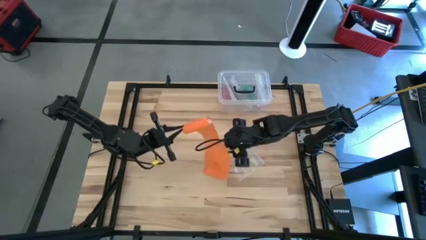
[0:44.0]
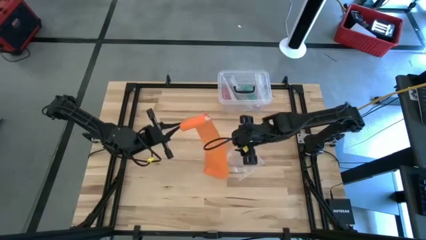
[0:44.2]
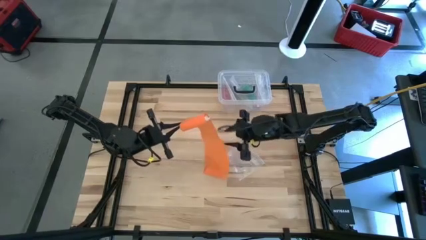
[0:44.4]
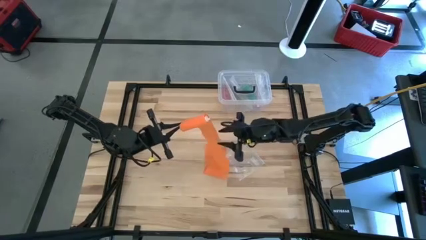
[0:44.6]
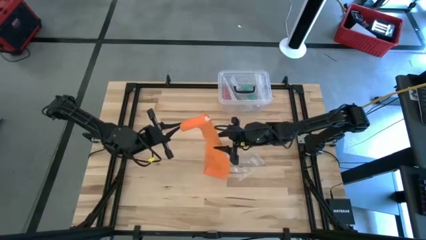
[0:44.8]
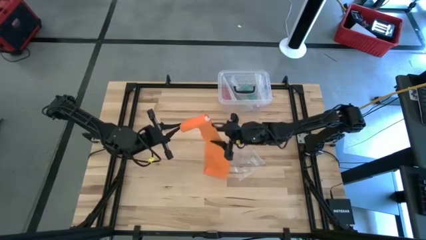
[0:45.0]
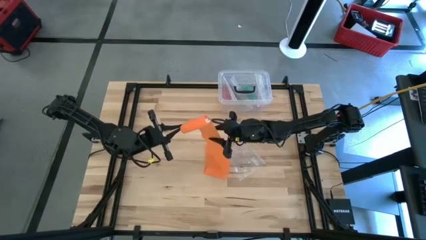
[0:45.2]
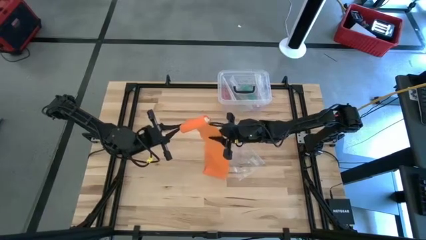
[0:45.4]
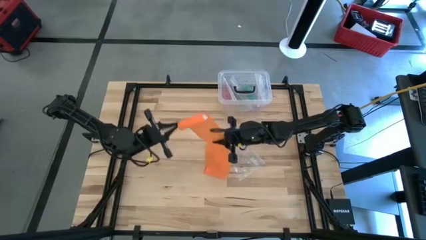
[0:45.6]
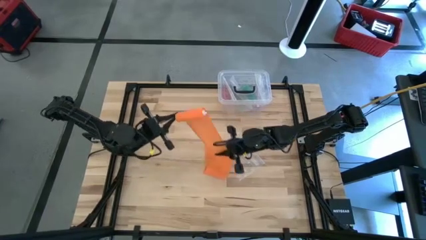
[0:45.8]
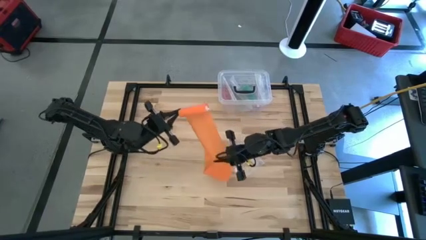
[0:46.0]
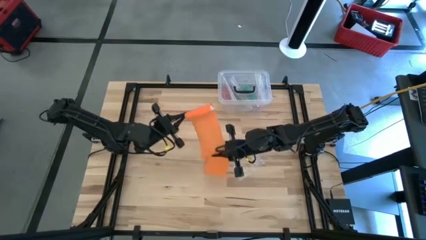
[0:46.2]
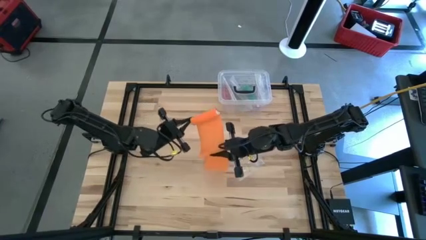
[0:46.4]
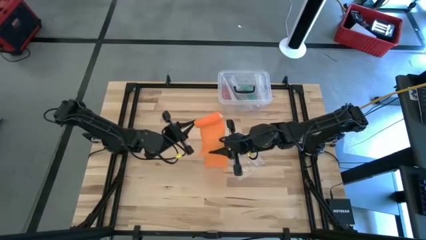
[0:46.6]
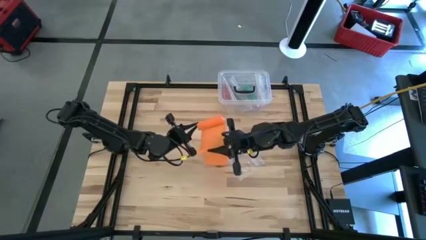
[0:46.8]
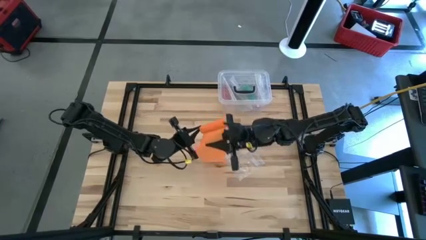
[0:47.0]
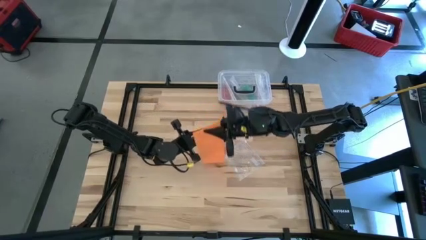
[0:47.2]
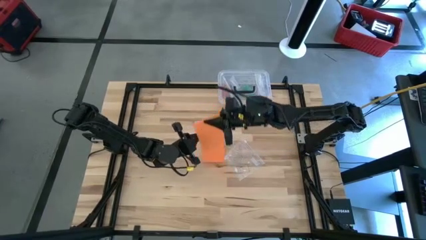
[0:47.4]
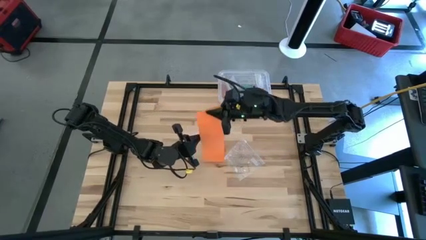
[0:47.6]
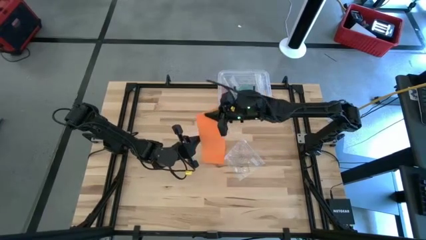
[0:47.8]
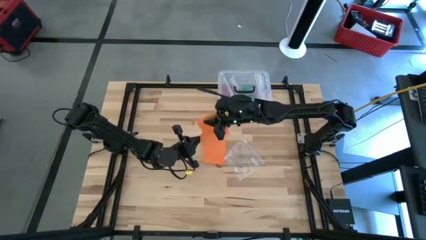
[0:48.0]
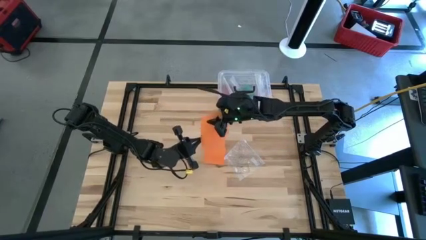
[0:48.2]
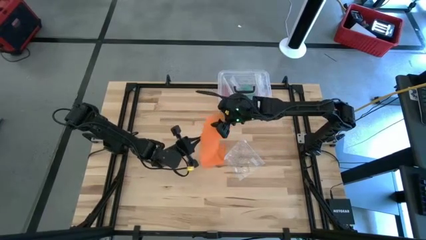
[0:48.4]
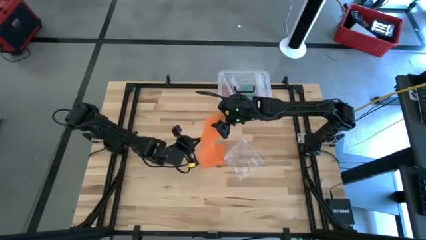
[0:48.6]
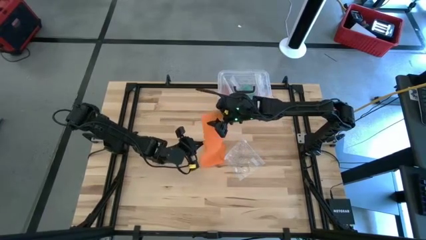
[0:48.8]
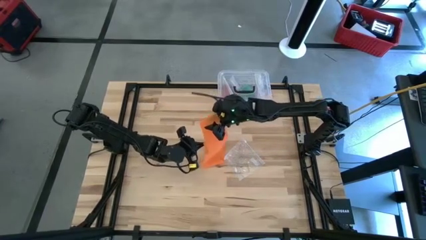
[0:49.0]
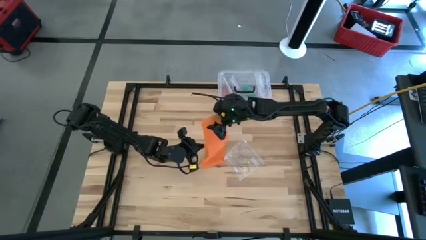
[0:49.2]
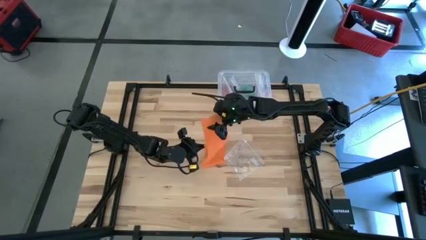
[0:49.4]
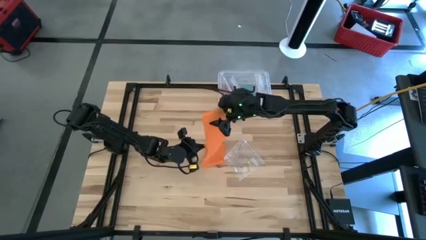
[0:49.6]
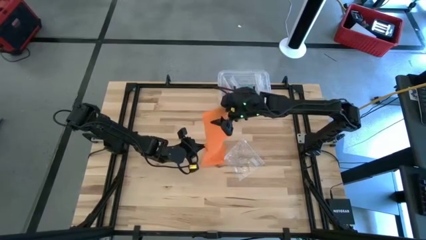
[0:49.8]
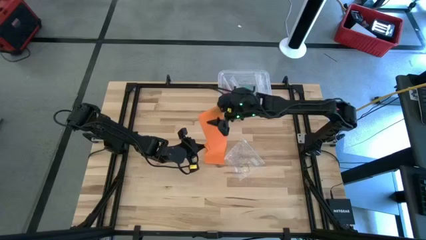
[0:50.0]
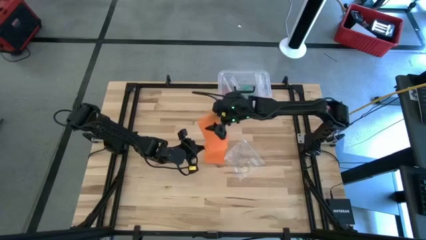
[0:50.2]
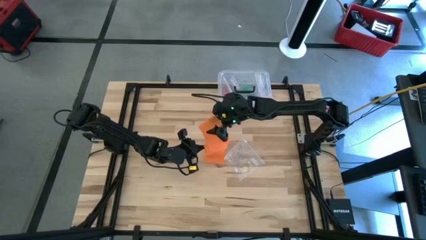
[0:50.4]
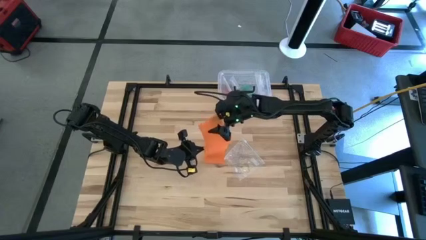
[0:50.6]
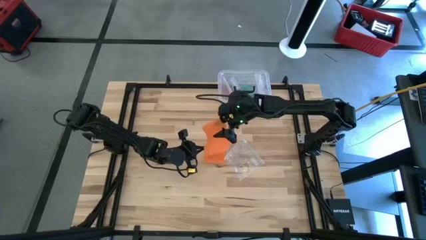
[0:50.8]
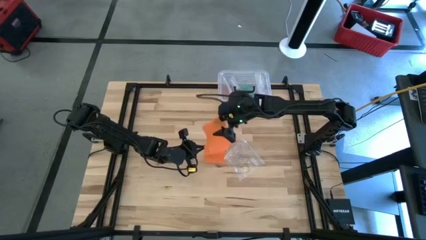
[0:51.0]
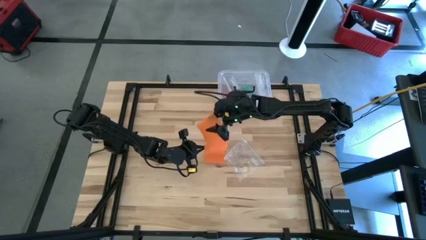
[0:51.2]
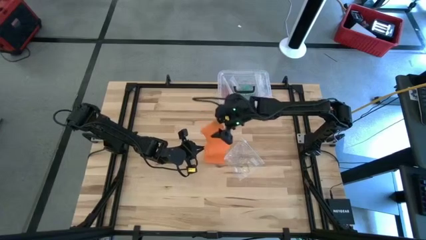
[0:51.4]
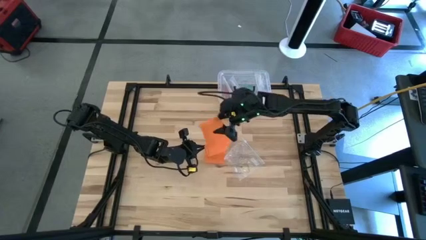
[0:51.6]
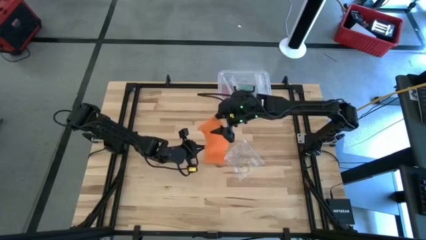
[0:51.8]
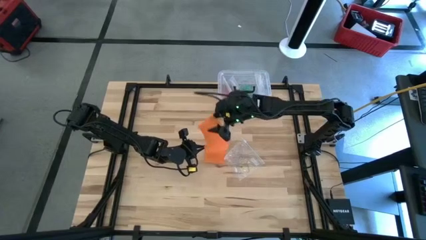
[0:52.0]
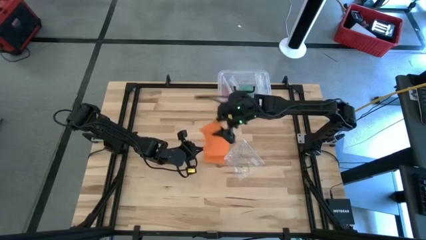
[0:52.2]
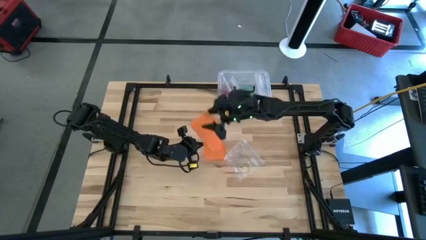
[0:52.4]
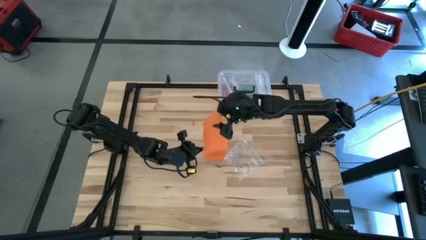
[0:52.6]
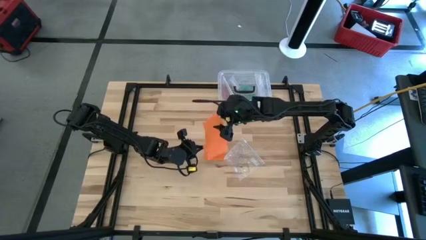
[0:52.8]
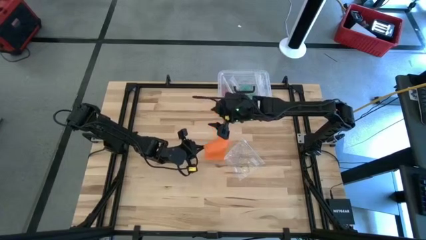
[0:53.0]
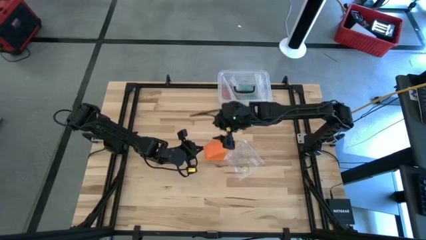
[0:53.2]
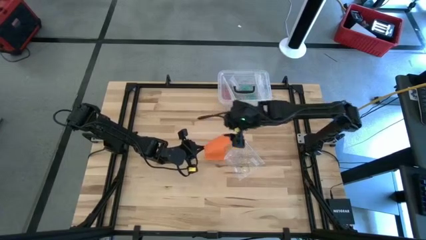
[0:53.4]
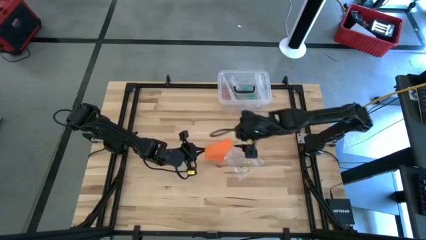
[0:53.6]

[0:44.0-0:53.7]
Task: Roll bandage
Roll the orange bandage

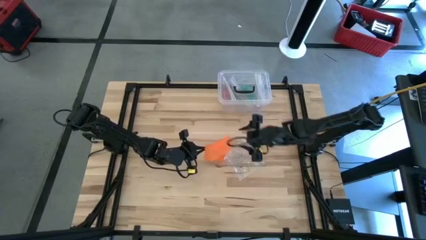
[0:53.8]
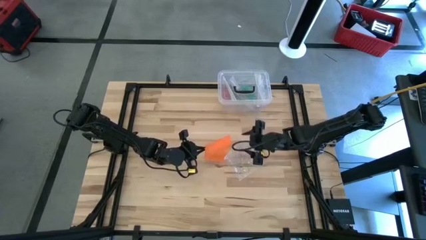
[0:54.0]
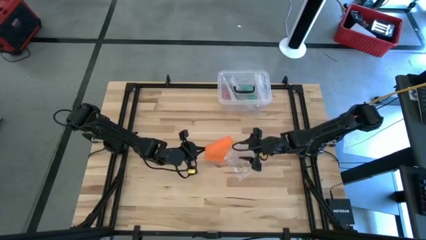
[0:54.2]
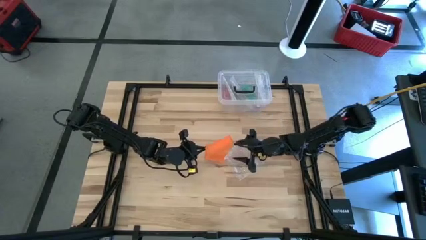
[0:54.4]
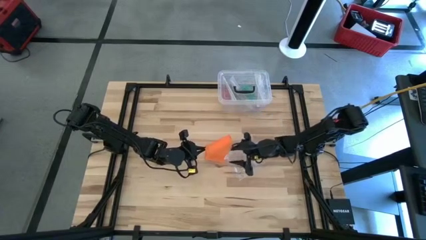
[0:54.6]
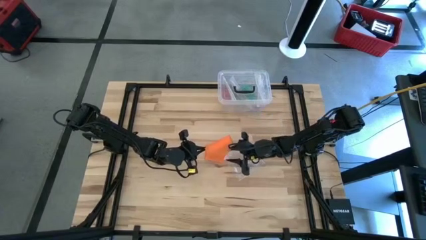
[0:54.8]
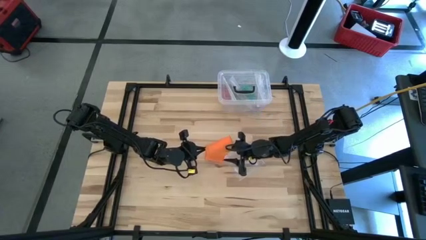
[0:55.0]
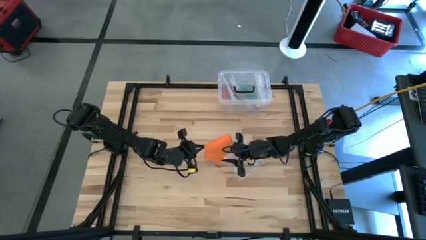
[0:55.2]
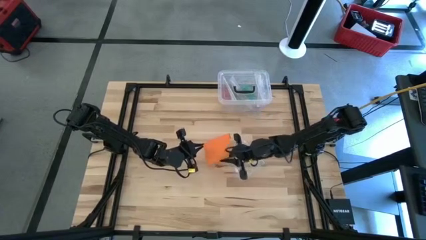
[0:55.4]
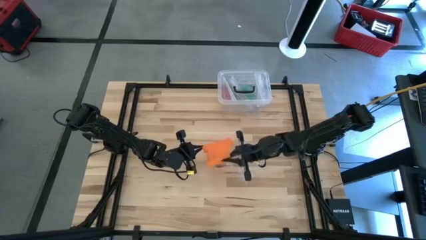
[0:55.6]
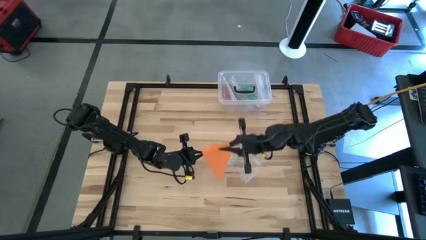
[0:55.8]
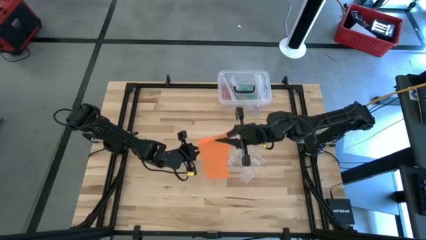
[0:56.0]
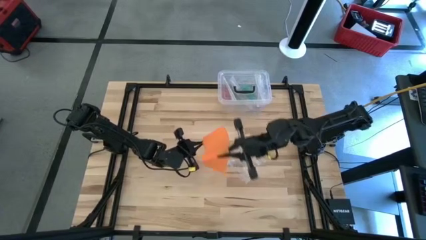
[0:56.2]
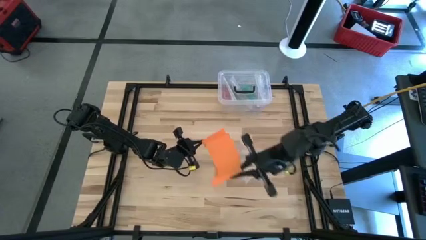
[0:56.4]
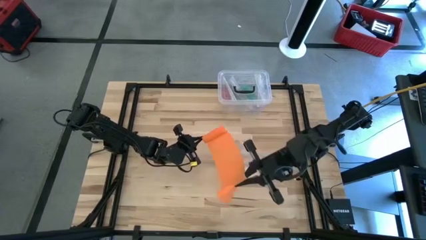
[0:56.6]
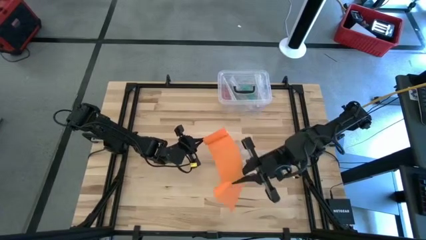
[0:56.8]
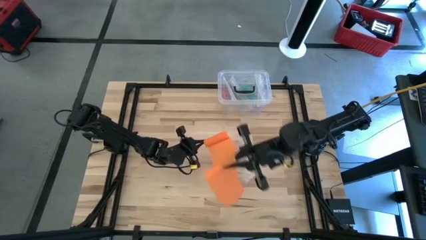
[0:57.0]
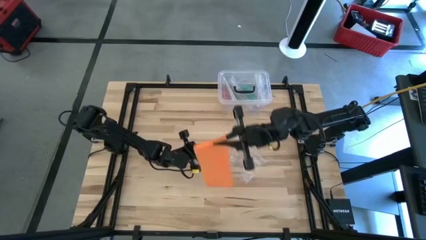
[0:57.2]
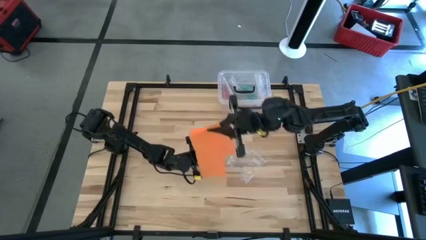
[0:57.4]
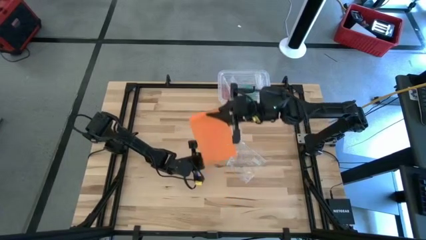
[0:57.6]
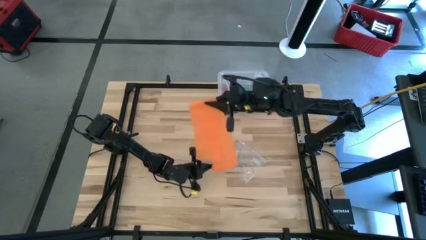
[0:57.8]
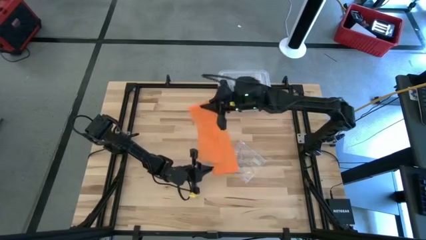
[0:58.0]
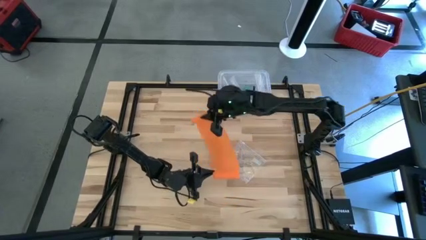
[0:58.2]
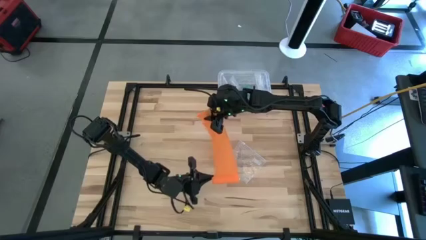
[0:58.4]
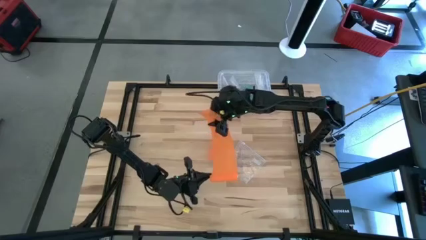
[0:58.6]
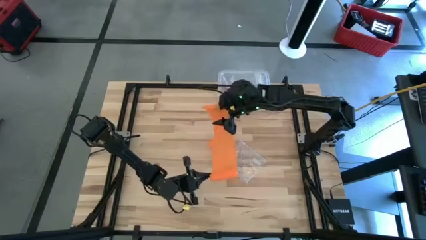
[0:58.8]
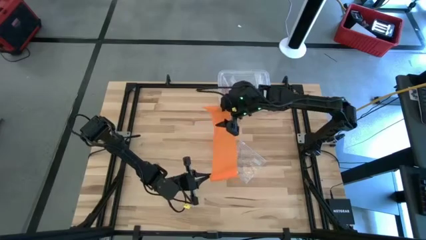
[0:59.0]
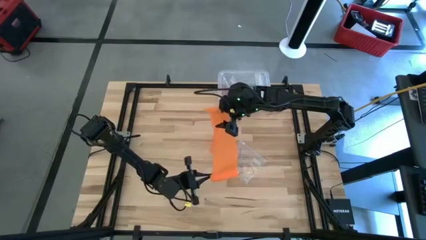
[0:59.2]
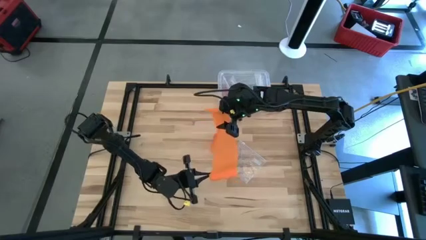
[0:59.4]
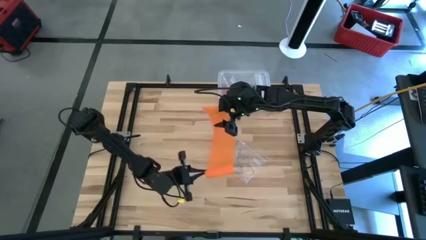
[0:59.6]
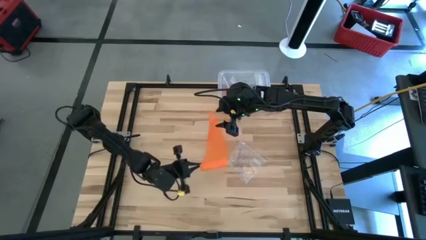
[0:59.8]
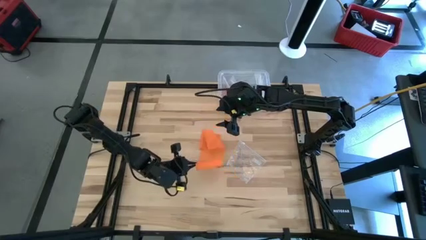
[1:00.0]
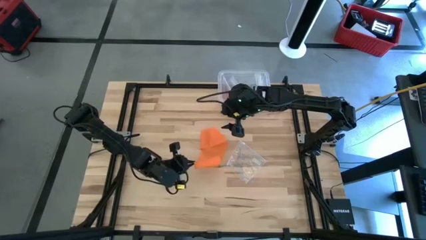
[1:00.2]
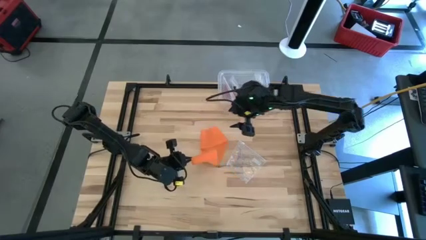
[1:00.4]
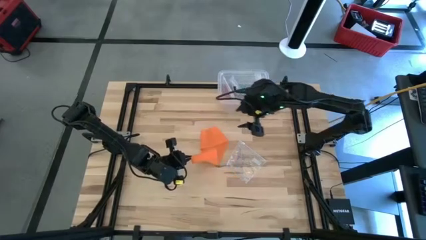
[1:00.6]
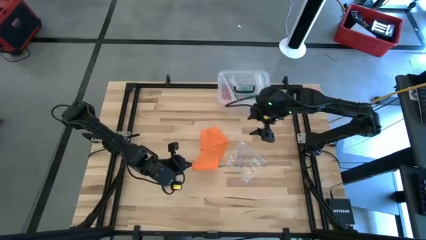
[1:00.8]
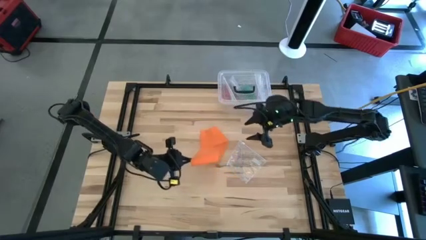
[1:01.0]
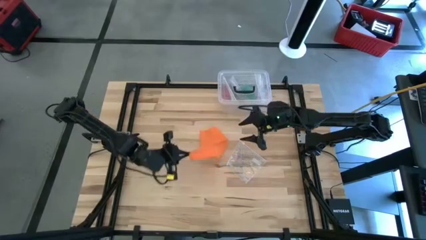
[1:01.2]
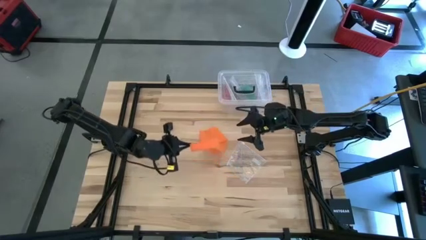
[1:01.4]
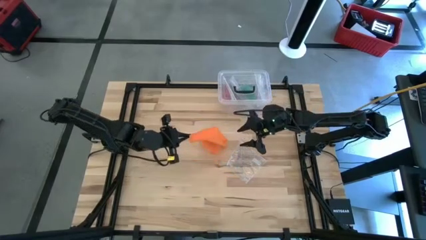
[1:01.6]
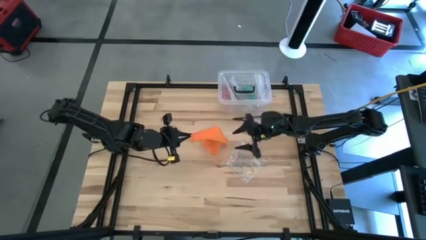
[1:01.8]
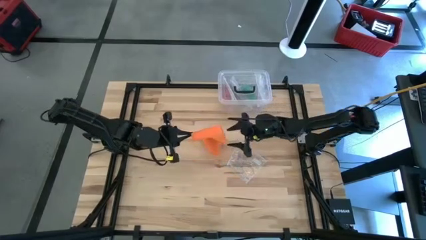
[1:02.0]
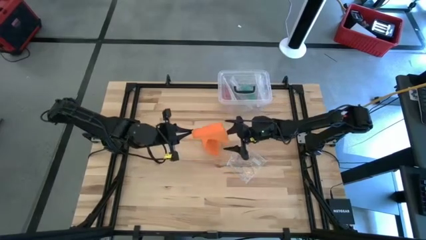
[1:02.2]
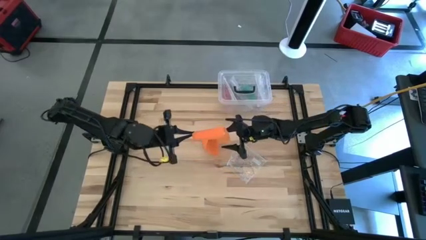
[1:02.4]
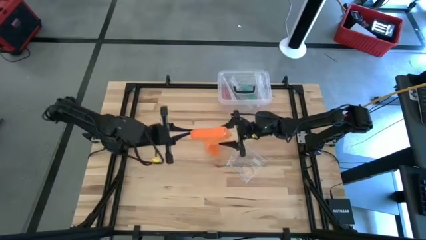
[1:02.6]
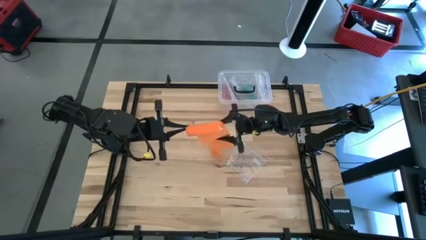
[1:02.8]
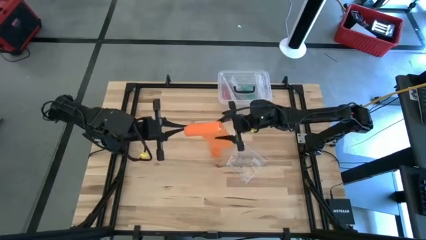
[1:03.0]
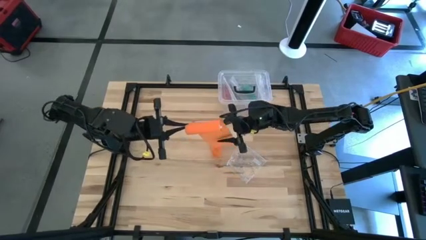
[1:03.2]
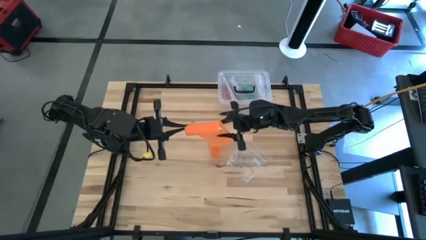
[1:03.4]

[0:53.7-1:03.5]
Roll the orange bandage
